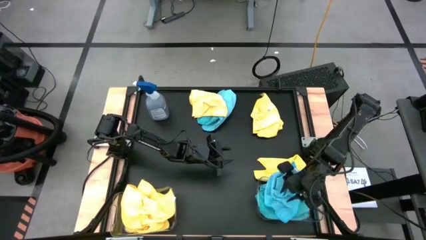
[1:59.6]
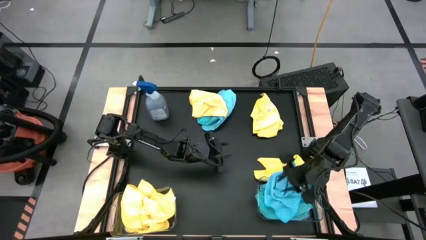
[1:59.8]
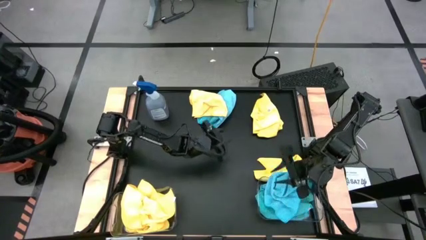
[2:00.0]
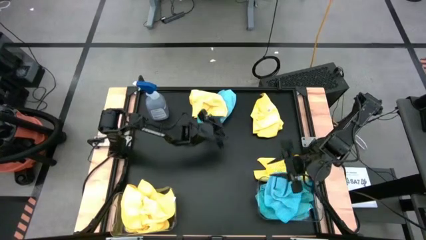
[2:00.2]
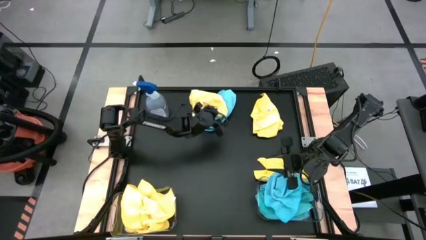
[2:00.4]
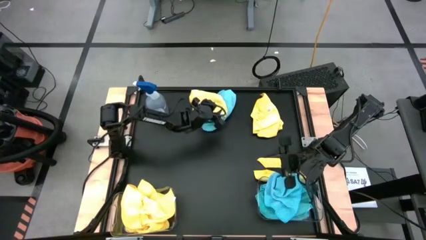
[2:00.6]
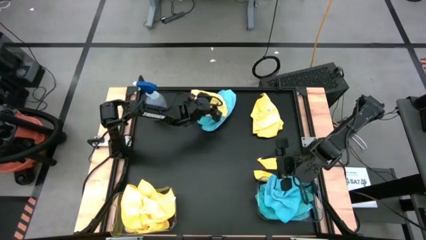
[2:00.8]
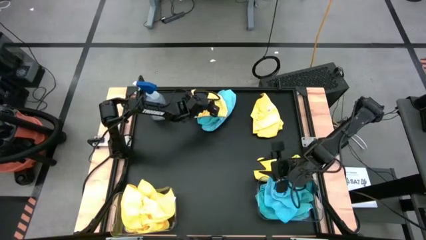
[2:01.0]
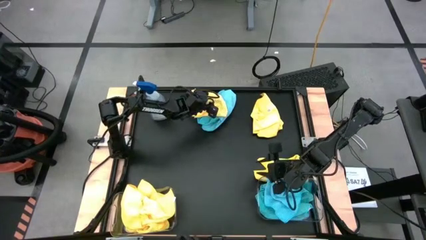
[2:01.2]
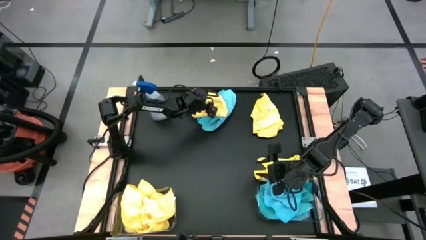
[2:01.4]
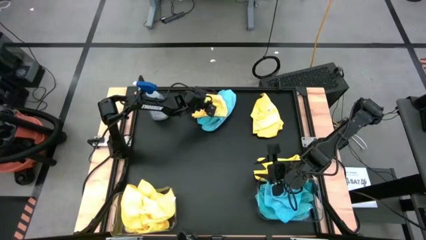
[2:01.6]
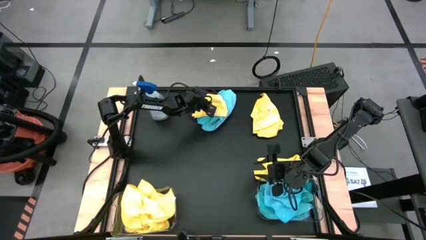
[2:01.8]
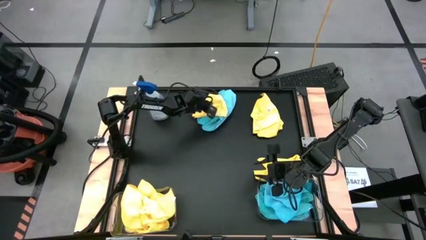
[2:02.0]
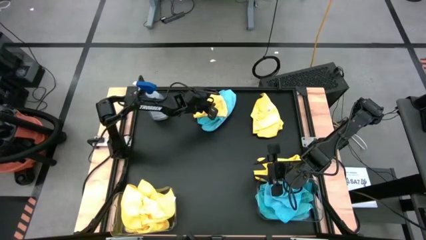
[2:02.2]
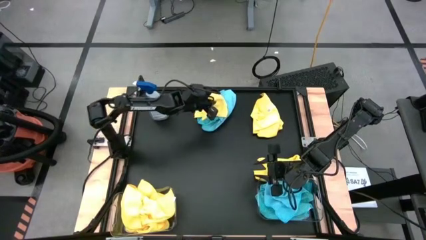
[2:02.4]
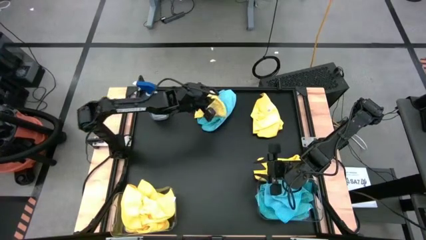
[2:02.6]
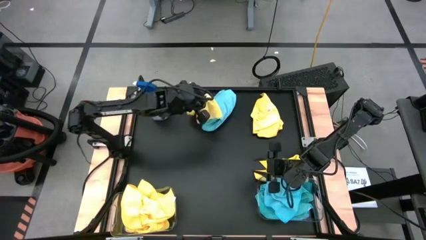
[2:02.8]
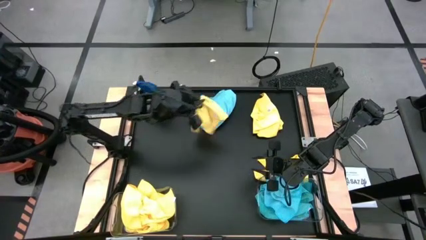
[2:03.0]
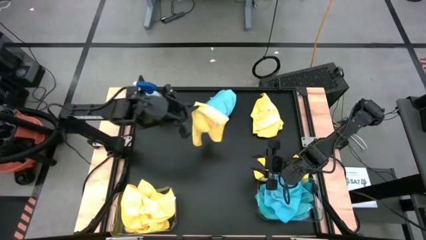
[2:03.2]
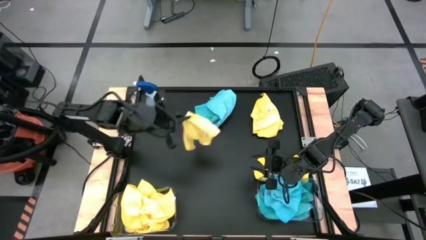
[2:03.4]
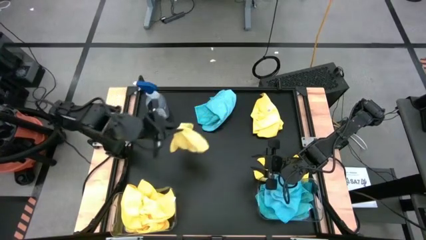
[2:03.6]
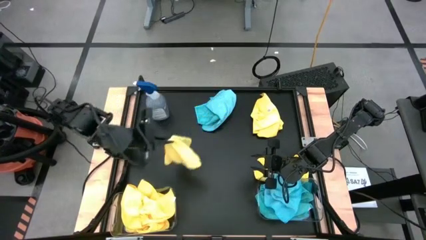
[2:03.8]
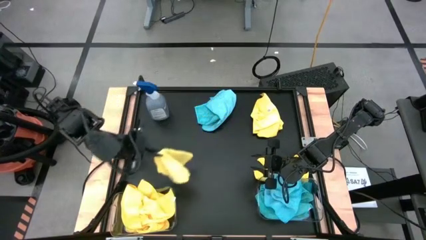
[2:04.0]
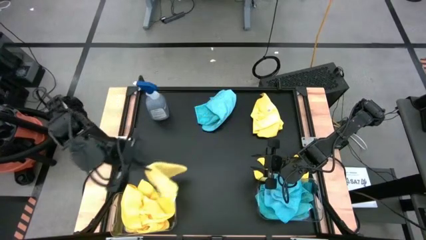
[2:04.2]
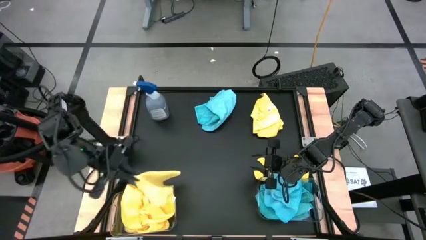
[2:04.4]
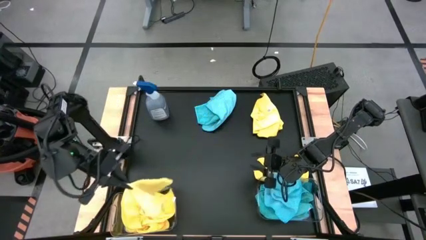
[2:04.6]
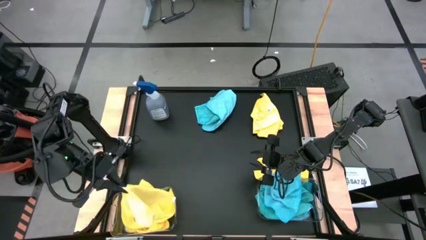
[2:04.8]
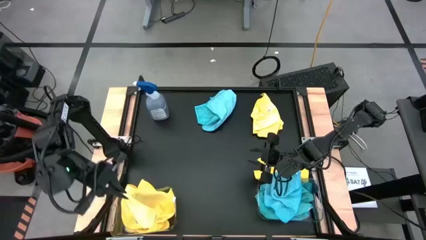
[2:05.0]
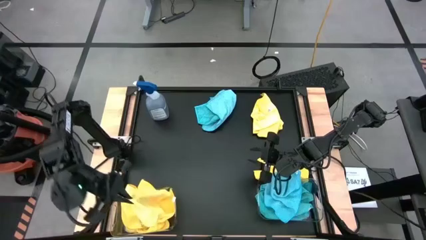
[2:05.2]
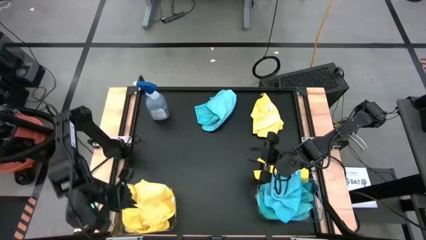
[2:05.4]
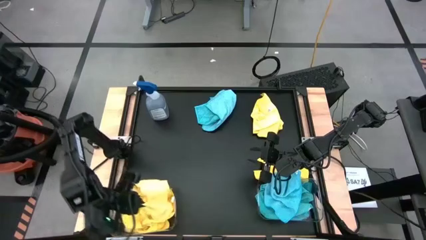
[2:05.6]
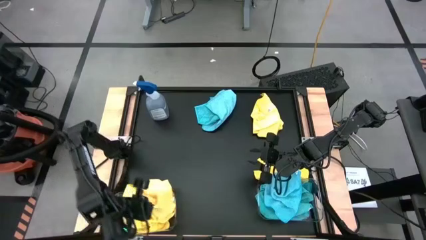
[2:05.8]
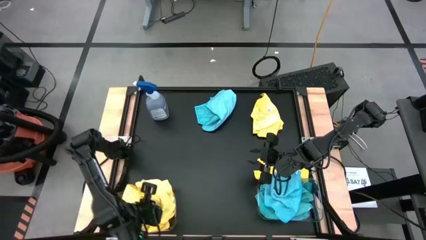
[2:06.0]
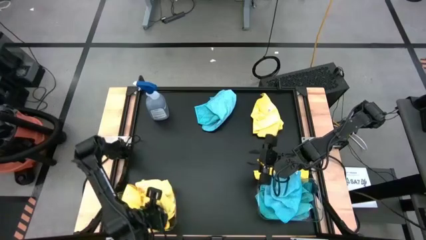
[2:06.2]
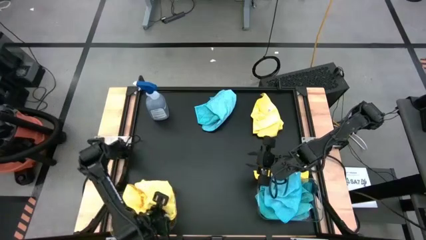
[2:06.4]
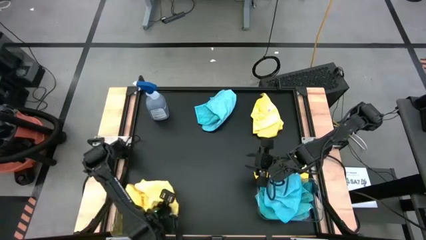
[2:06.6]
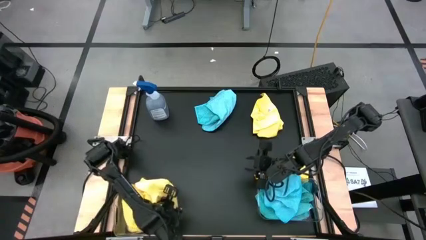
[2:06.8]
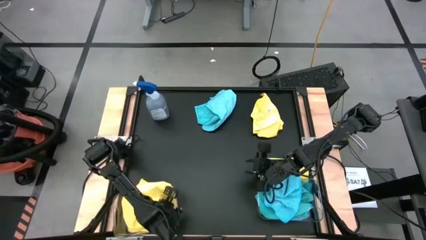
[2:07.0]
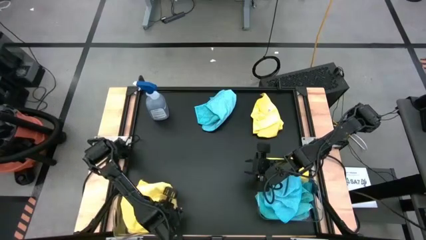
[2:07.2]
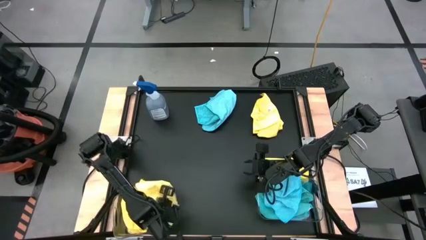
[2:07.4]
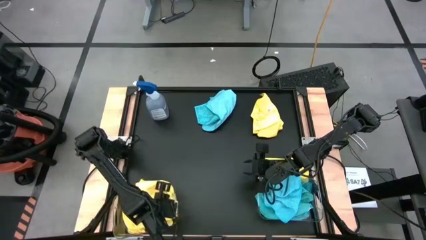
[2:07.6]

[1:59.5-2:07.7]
Task: Sort microfiber towel by color & place in baskets
Put the yellow towel into the left transparent bin

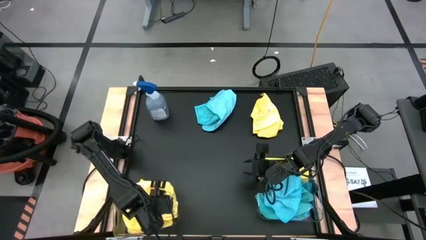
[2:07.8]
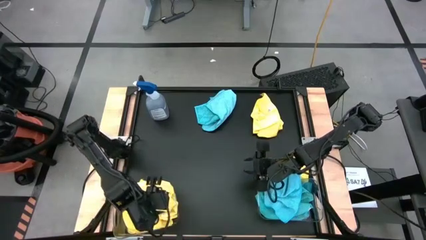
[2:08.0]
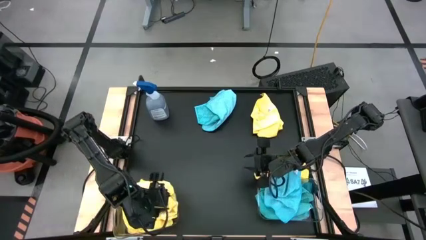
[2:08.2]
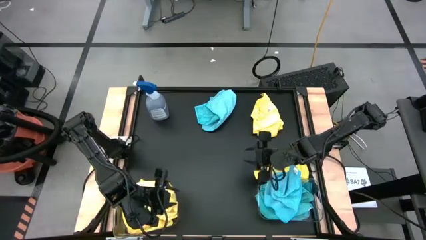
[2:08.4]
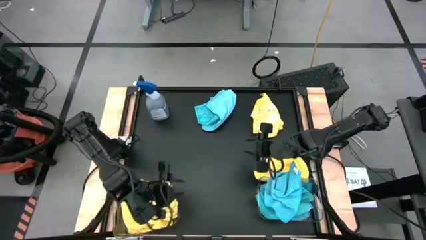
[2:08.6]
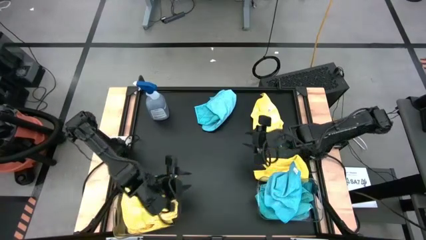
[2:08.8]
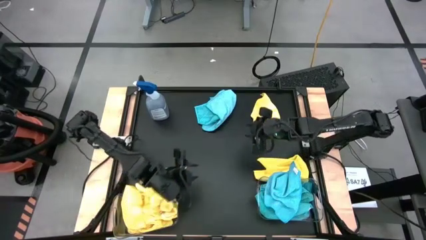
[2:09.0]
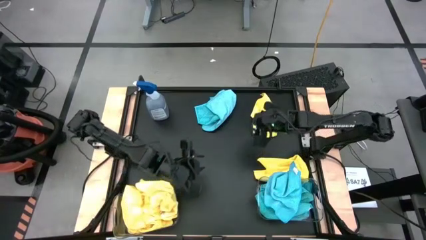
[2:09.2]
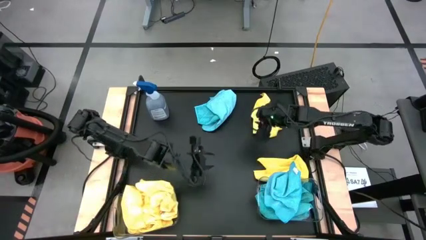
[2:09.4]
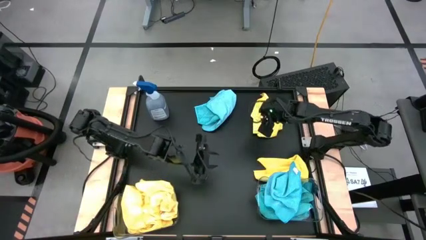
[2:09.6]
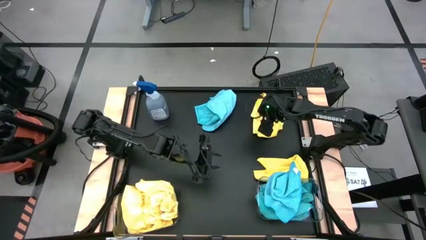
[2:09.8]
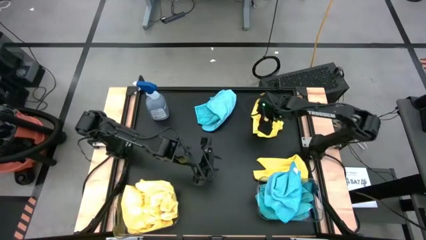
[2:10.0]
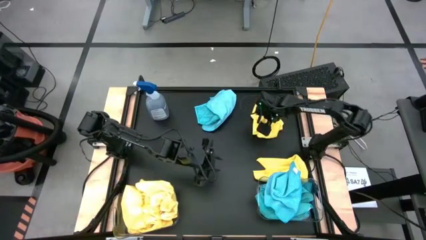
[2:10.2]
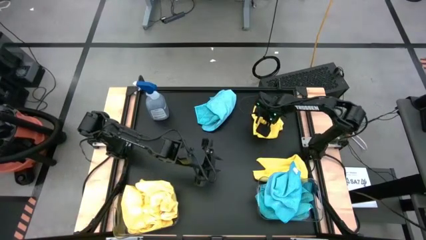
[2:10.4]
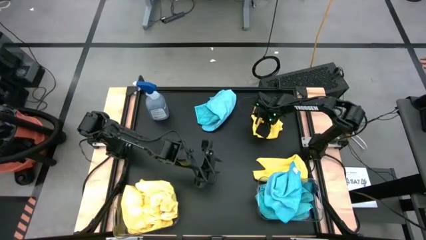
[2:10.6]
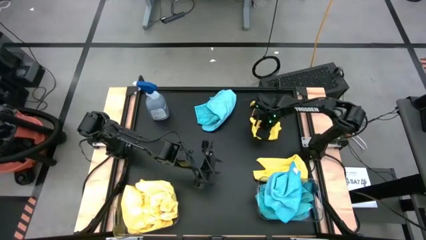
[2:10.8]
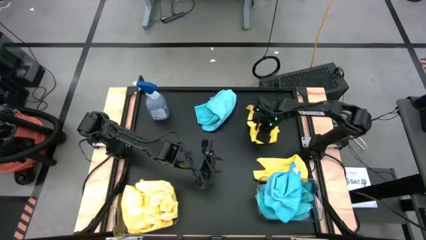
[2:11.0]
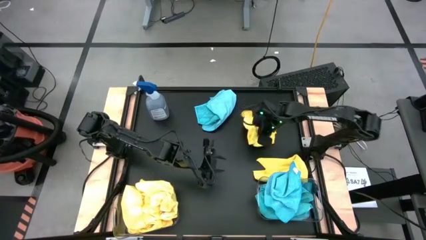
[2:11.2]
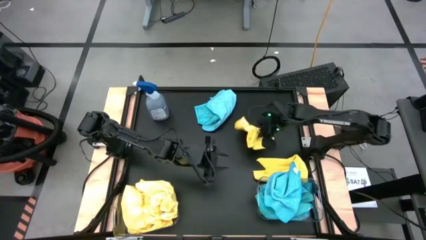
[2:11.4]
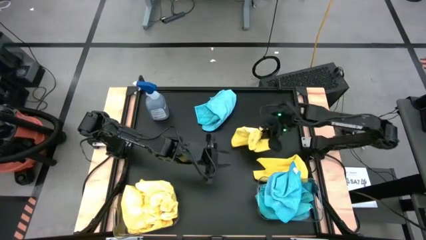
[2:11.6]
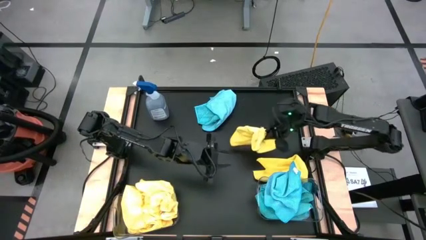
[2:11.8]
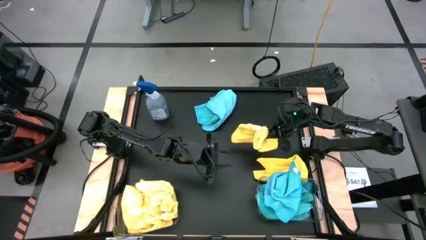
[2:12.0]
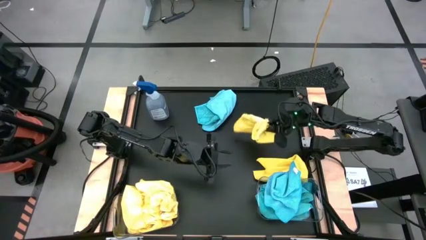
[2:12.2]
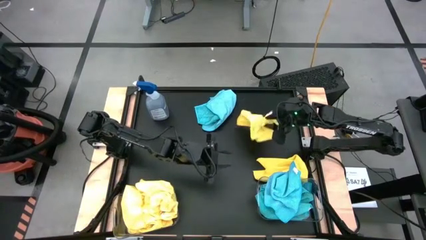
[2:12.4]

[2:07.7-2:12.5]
Put the yellow towel into the left transparent bin
